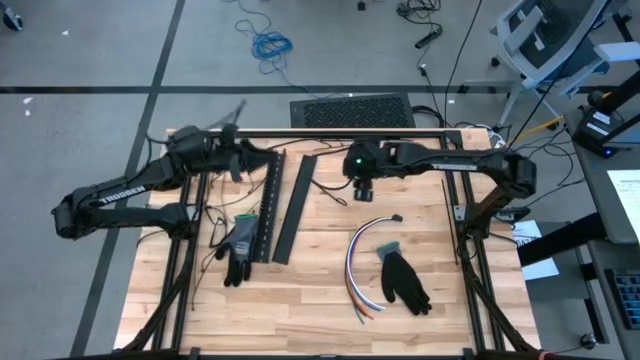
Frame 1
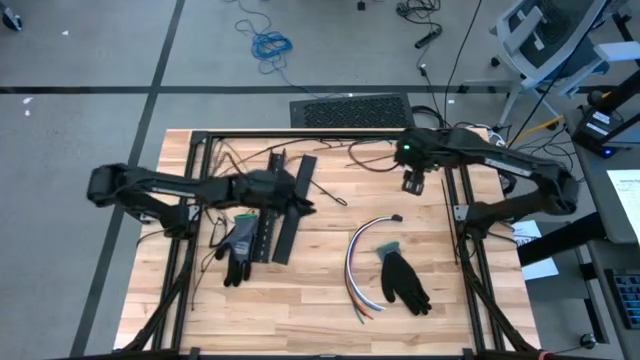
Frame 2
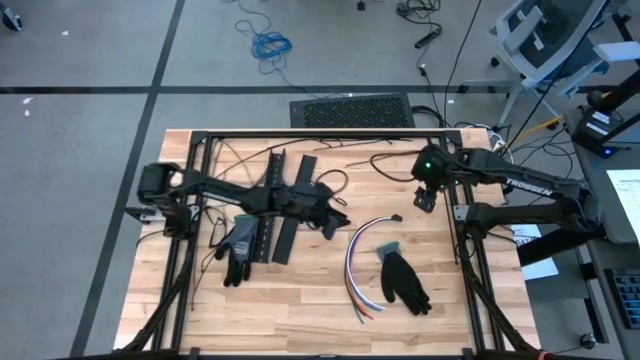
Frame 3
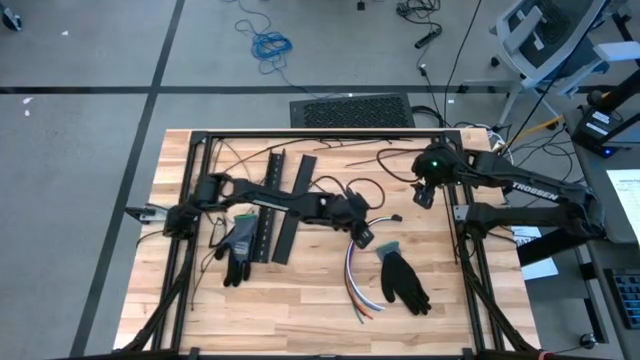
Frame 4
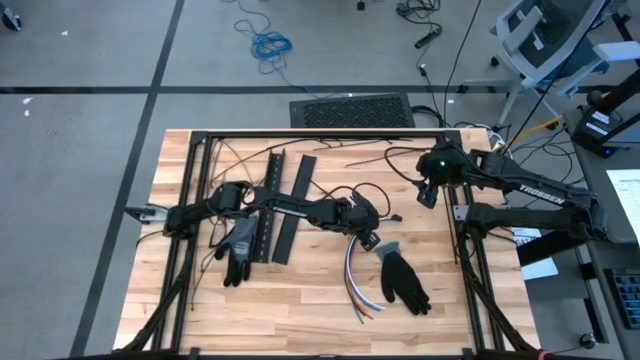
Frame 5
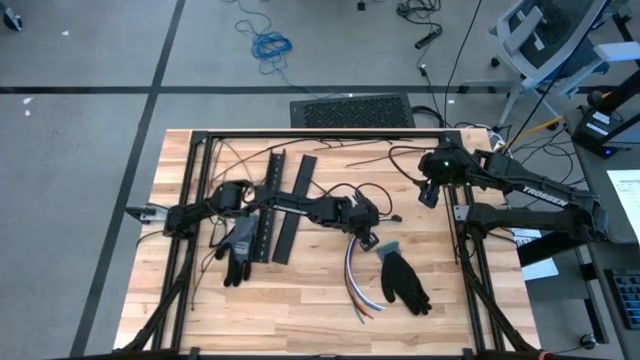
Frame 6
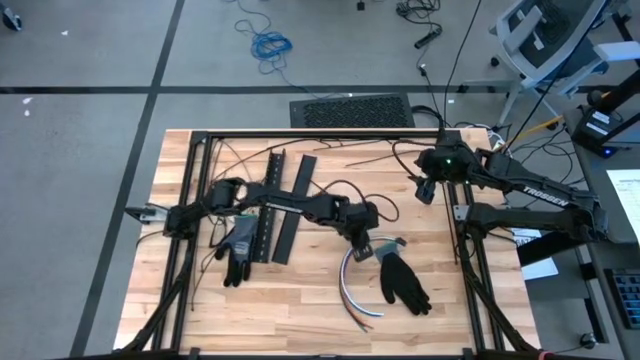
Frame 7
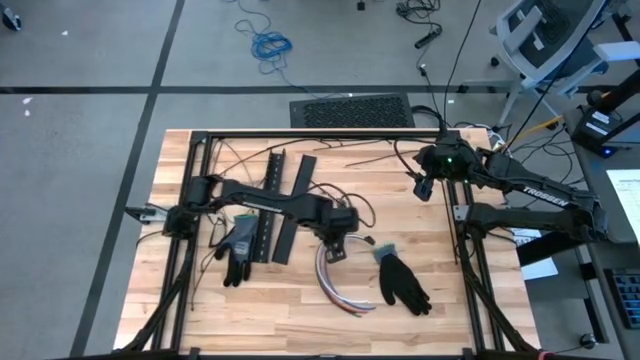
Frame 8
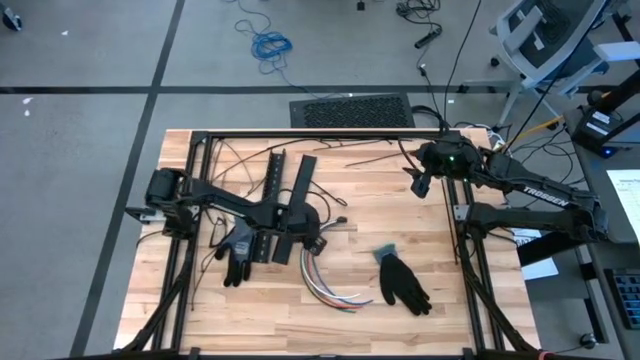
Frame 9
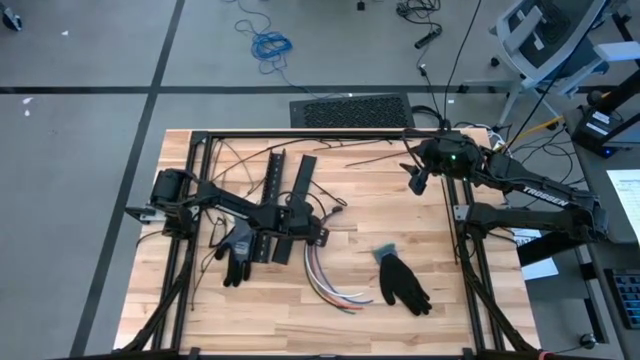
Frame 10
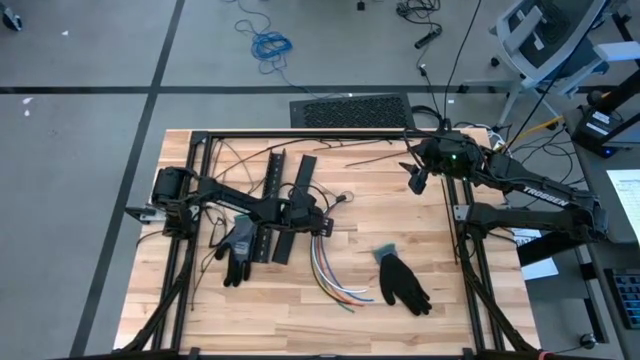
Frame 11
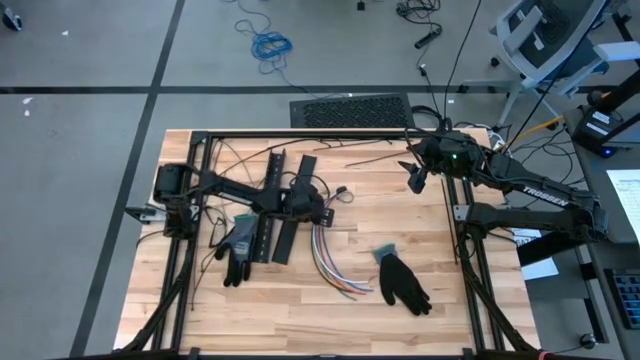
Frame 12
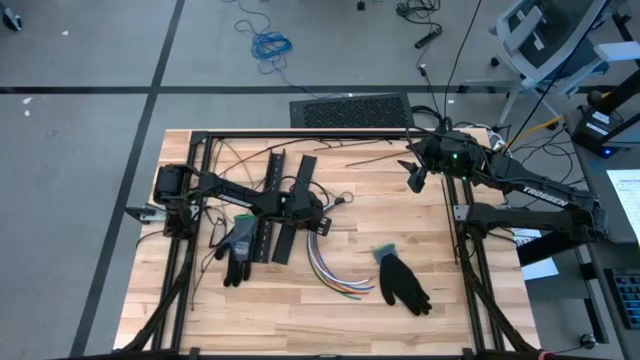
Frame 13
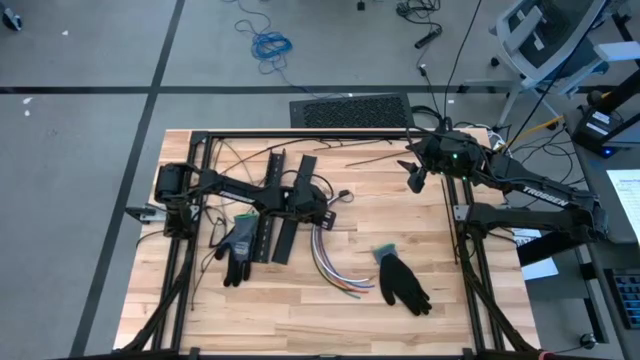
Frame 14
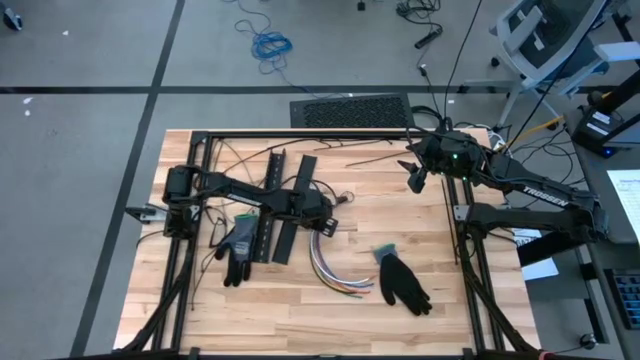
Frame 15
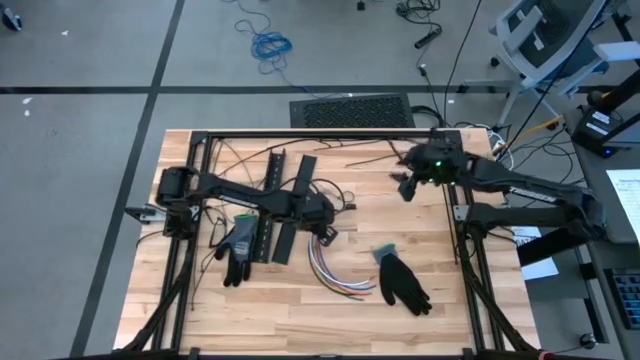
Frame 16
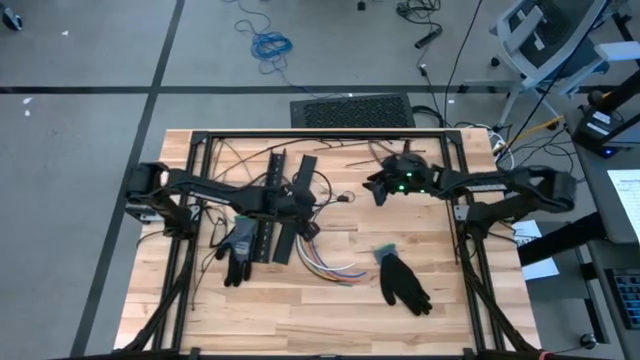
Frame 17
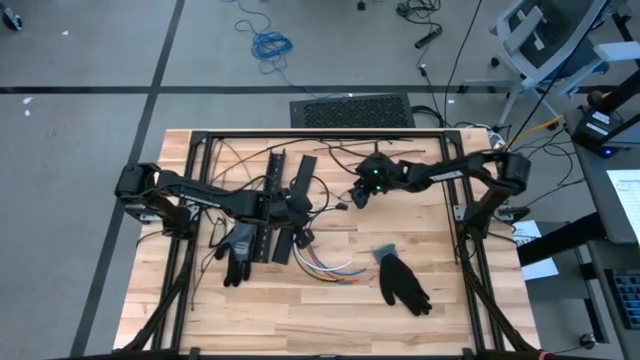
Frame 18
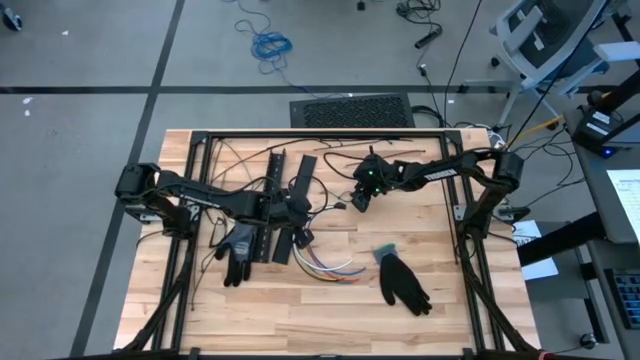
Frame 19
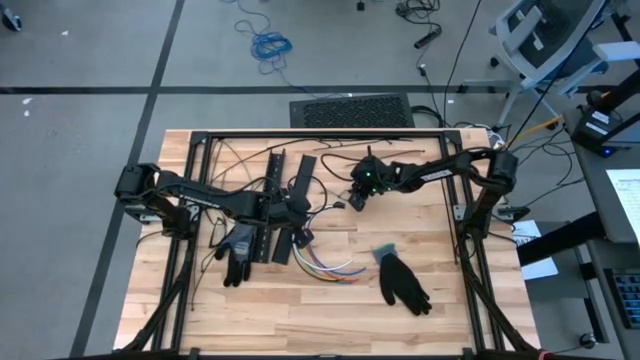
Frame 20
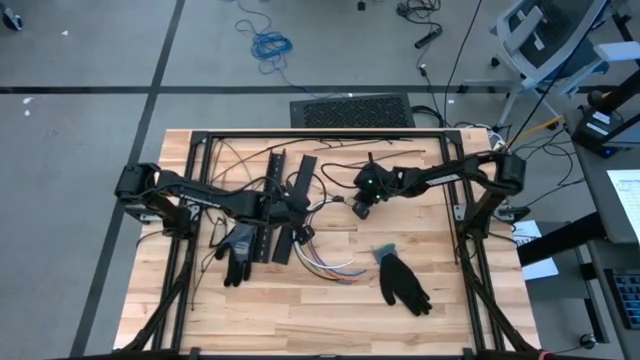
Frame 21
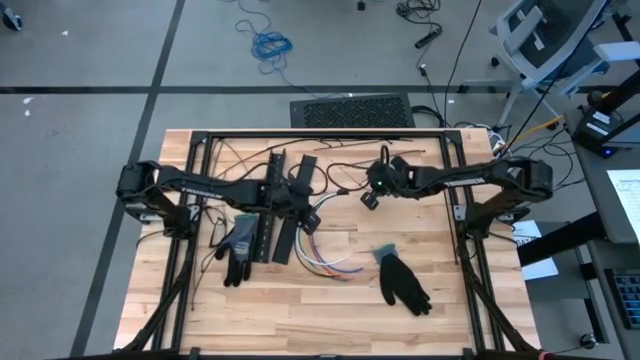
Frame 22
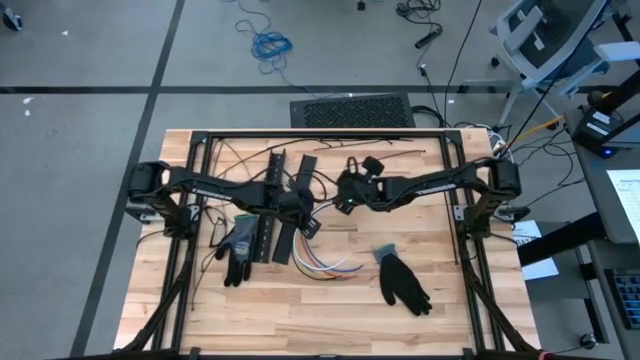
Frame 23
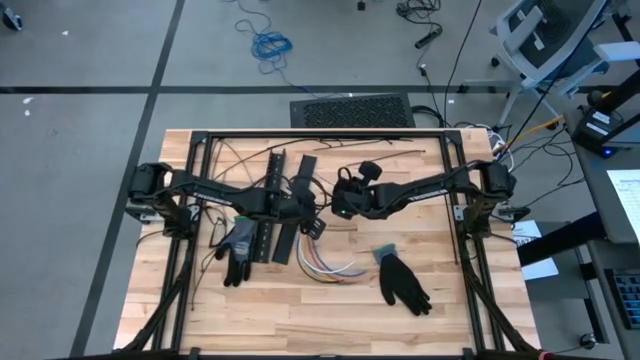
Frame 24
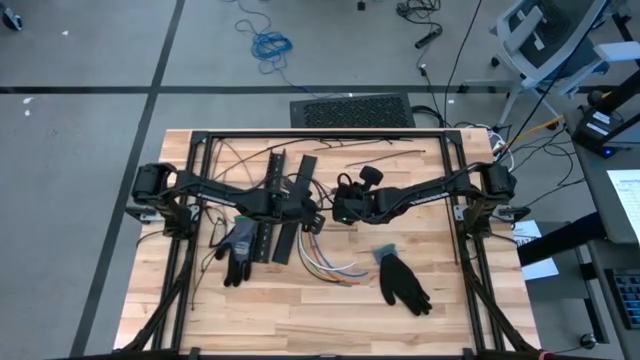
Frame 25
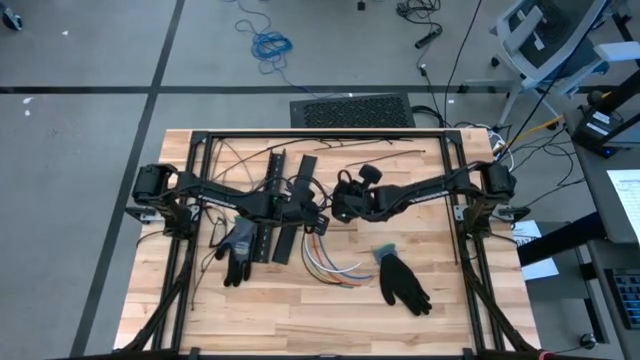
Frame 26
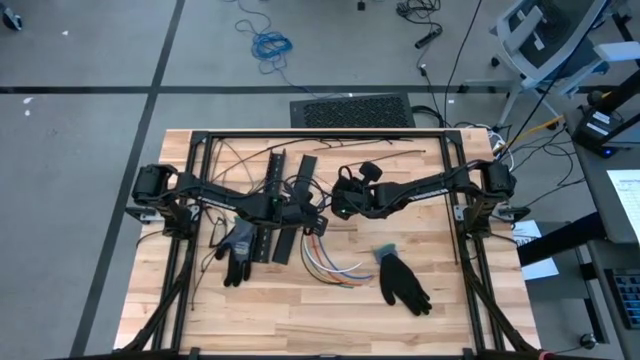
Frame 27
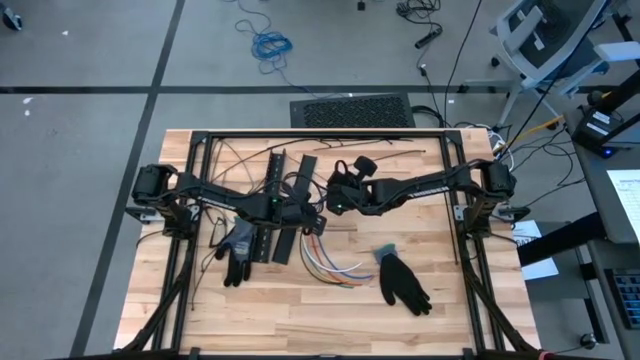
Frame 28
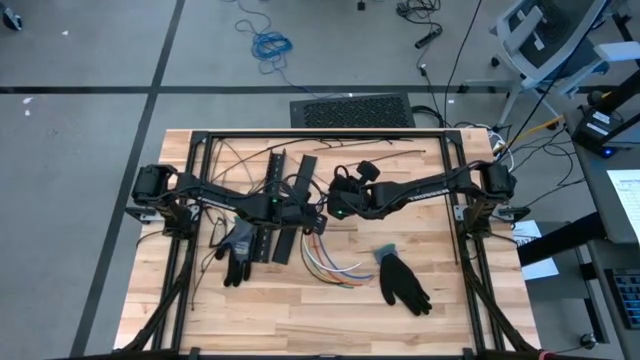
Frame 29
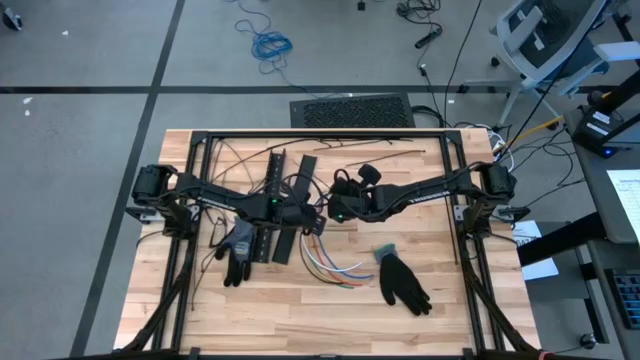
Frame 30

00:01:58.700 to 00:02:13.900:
Task: Ziptie cables
Wrap the cable wires with the black ziptie

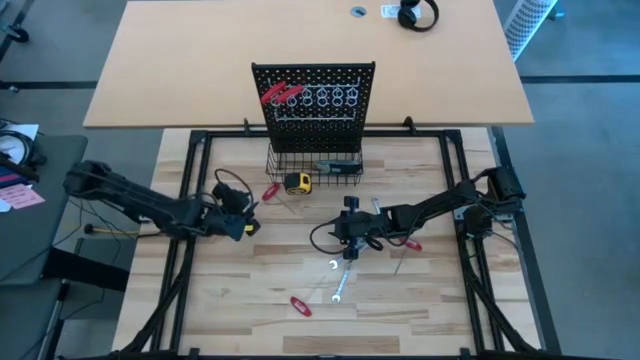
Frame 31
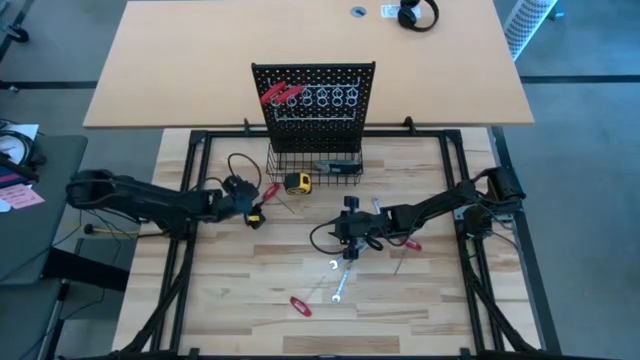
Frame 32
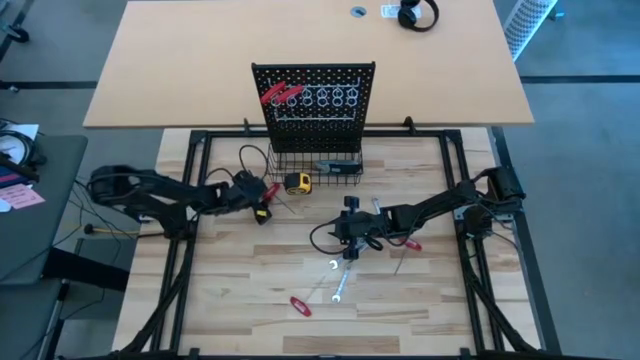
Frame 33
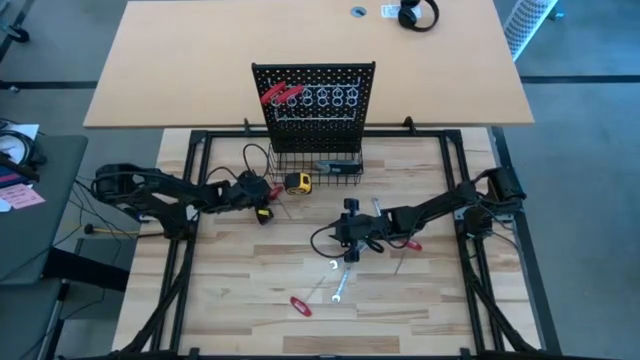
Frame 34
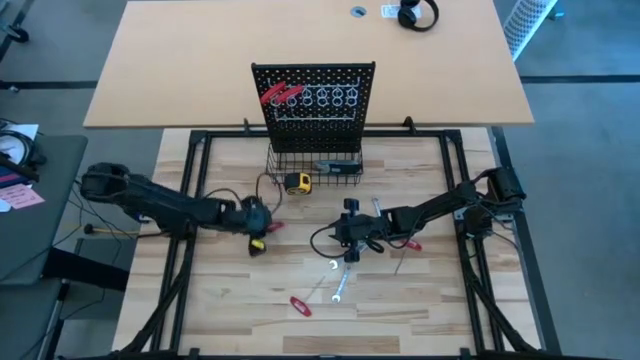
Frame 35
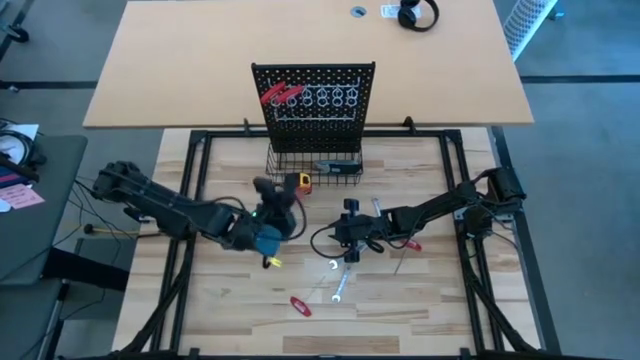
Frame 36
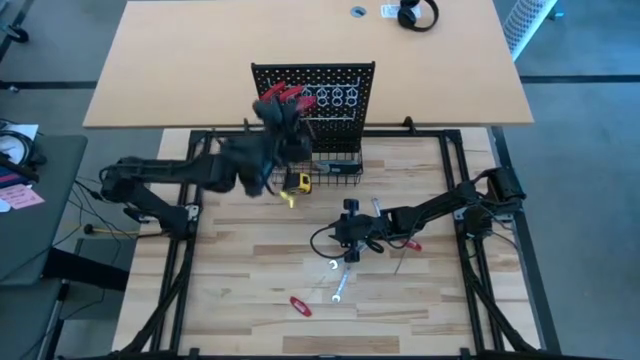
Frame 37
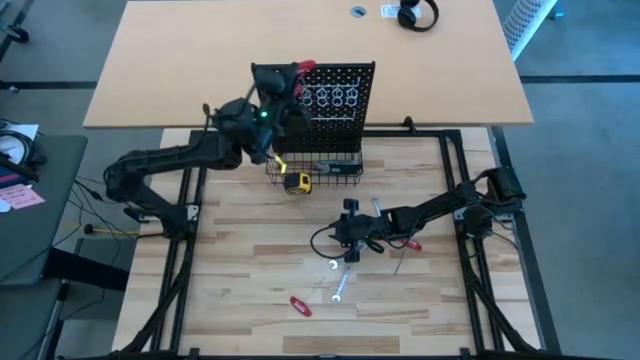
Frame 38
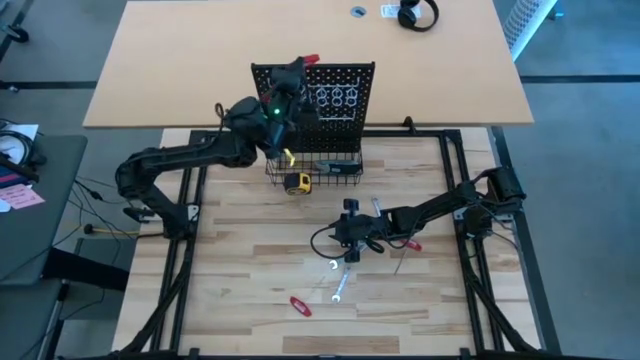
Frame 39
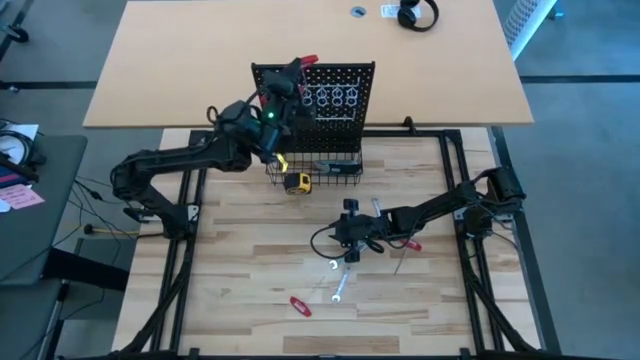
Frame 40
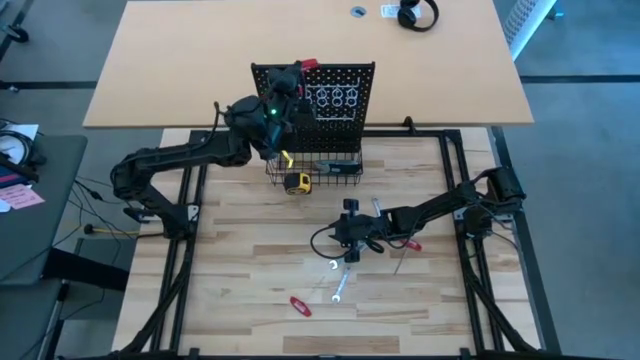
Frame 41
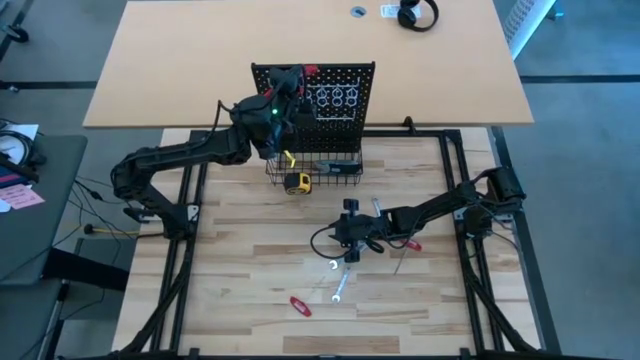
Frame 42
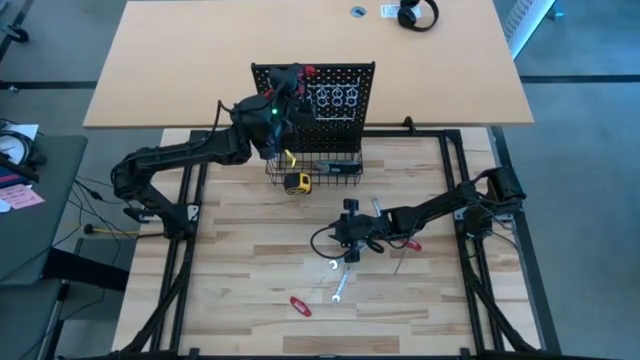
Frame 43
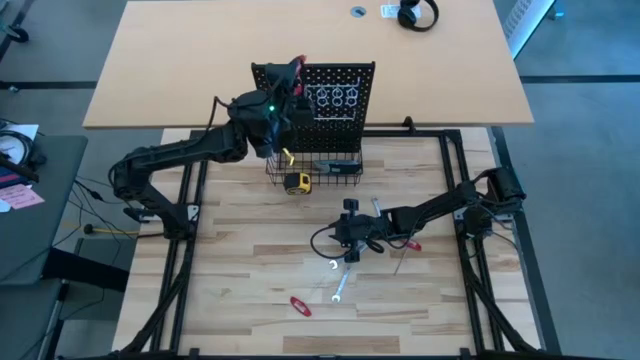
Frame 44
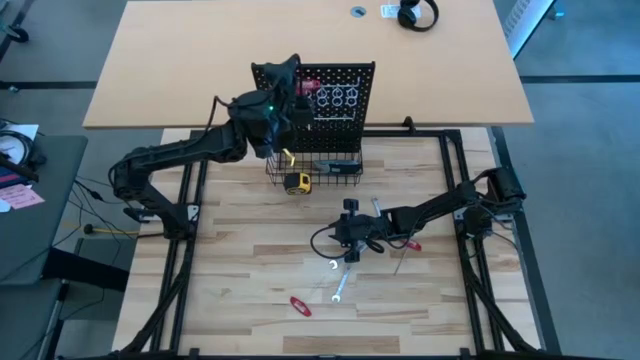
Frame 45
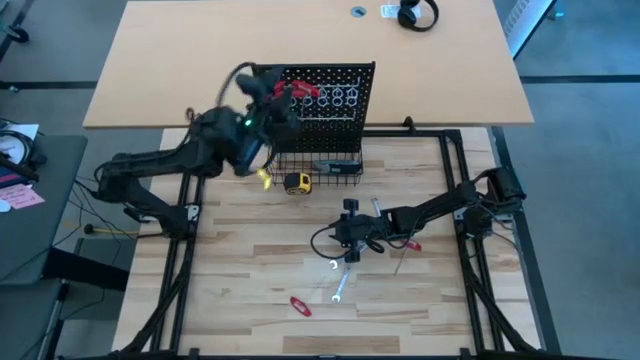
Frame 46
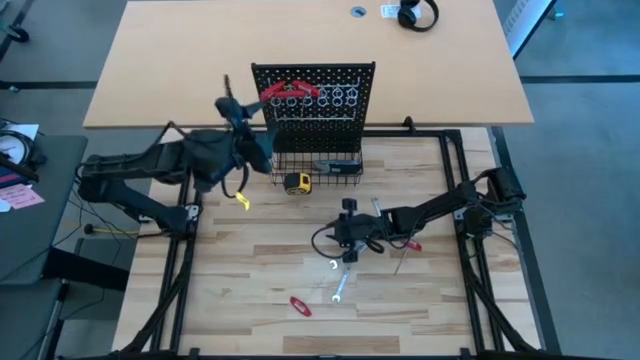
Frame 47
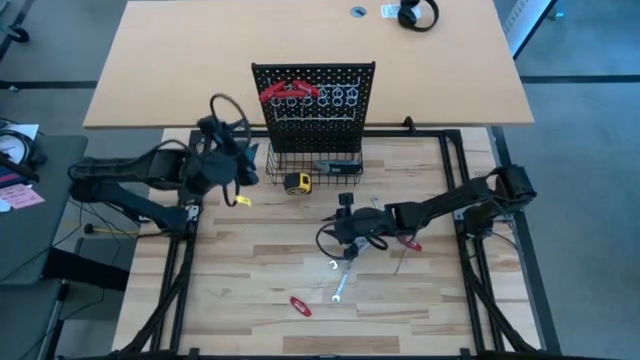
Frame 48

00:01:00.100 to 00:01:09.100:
Task: Hang tools onto peg board
Hang the red T-handle Allen wrench into the pegboard
